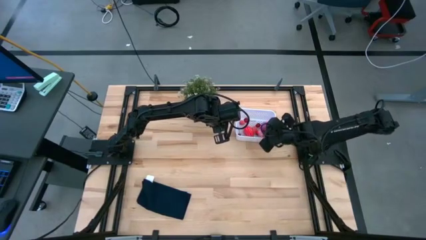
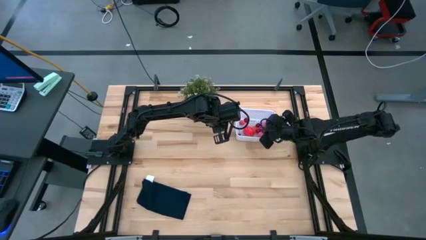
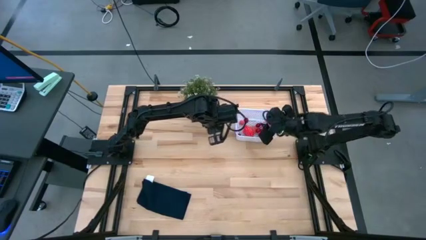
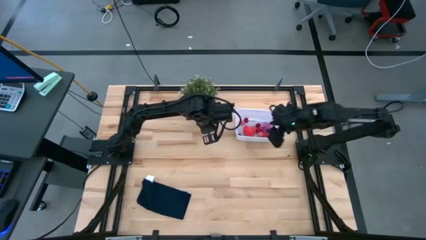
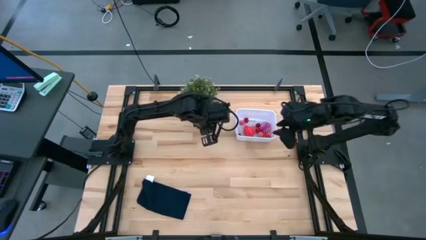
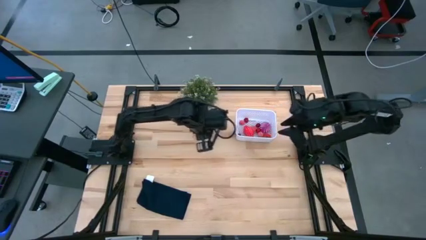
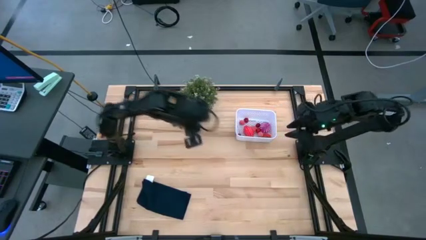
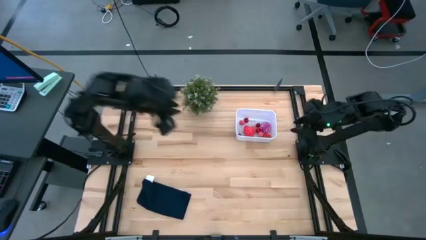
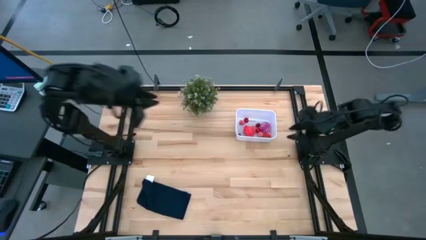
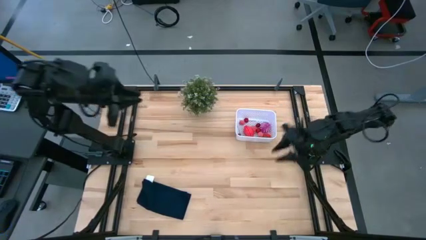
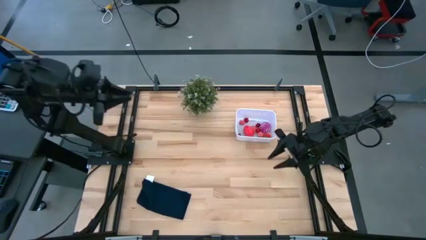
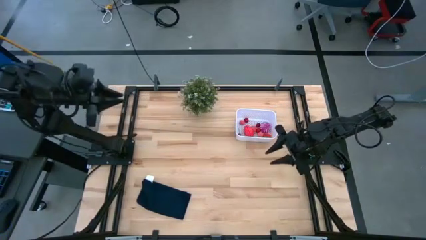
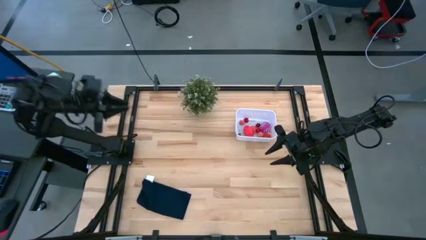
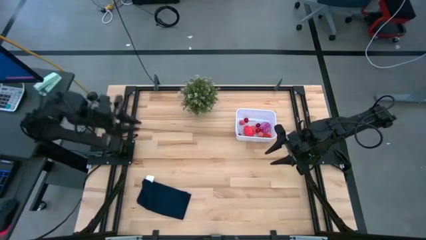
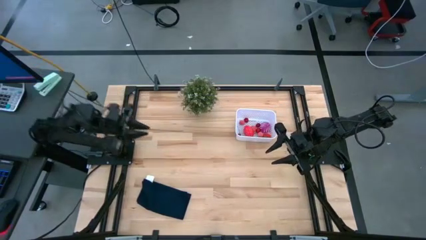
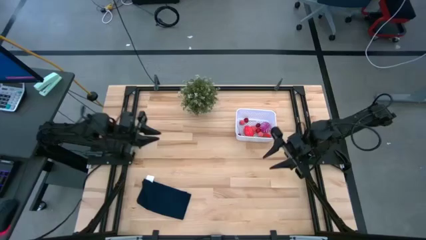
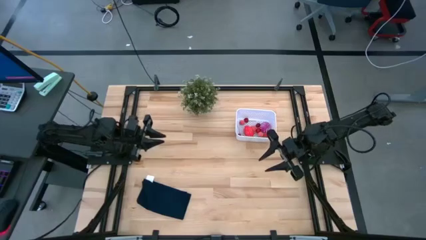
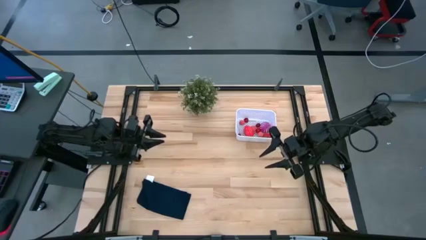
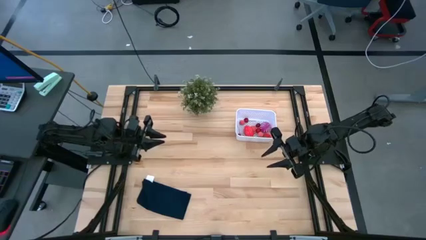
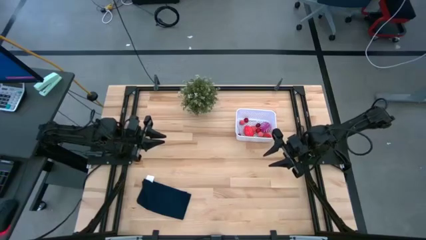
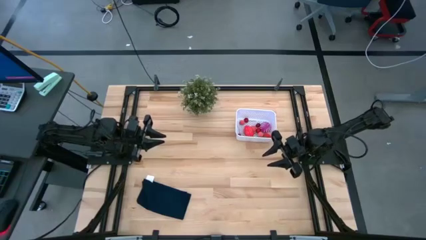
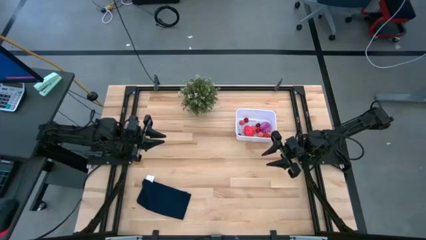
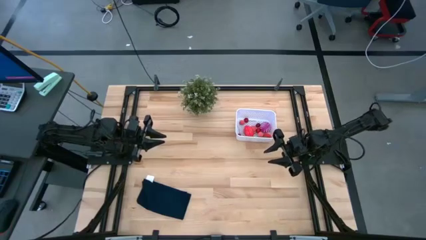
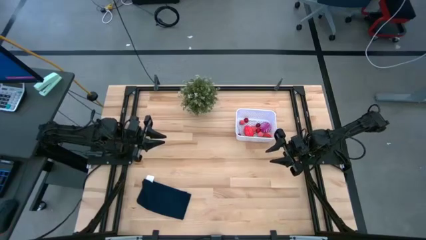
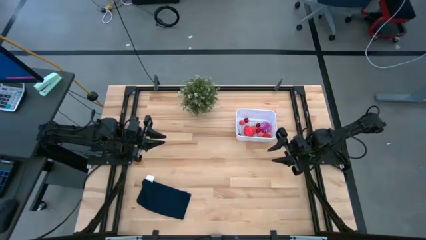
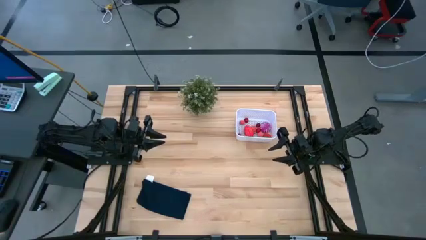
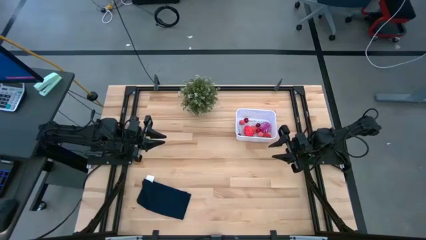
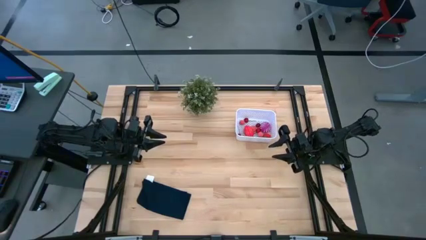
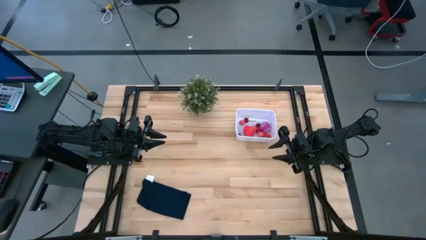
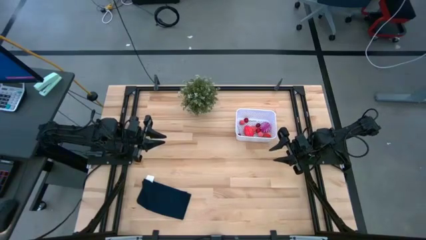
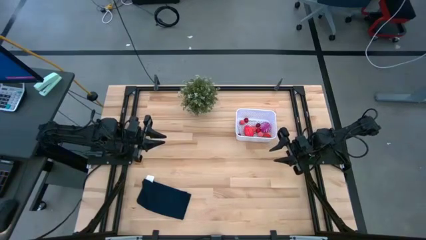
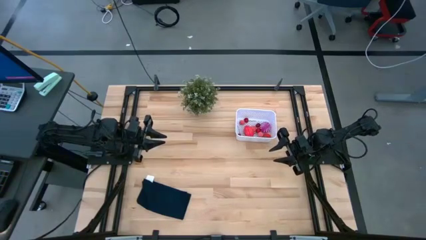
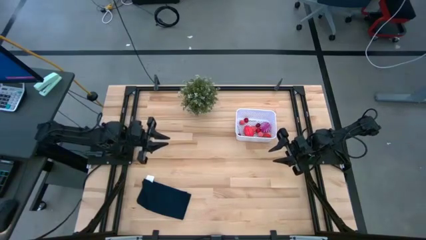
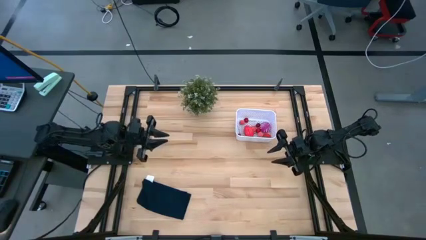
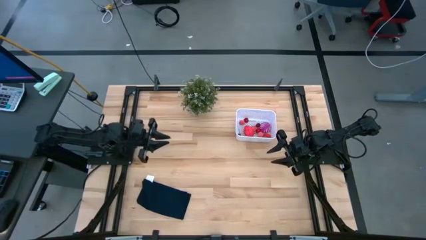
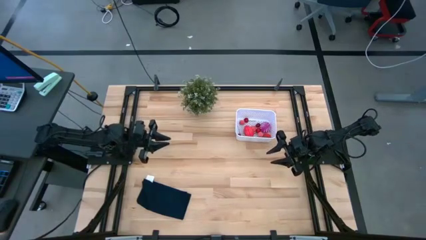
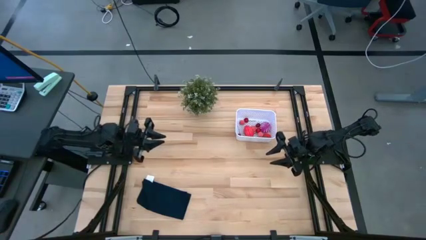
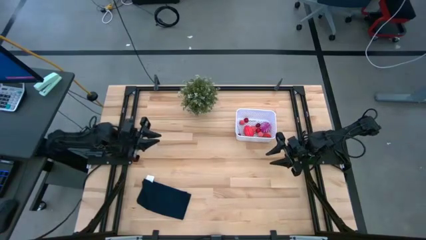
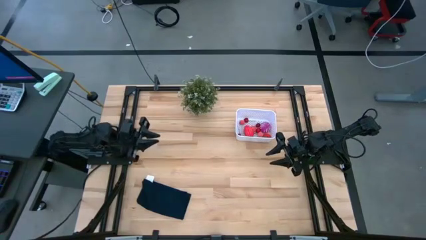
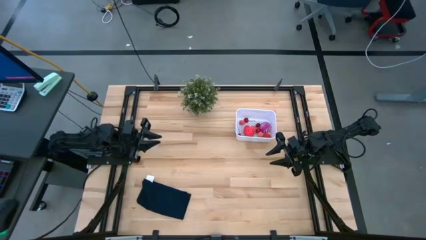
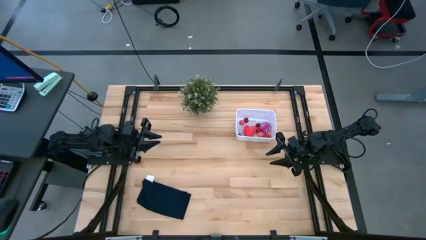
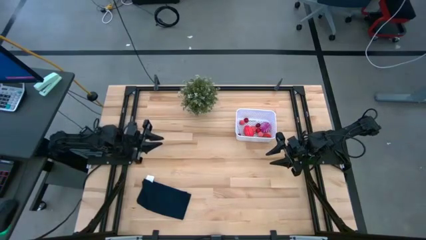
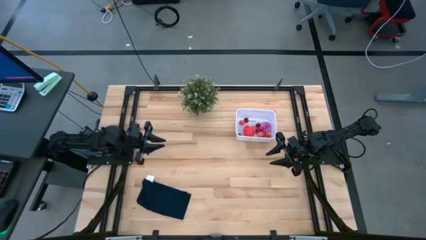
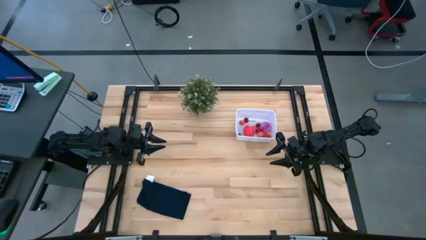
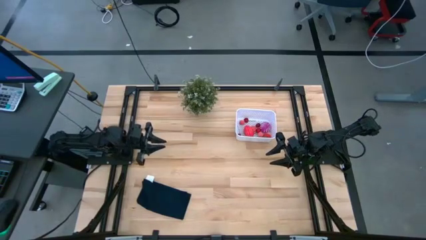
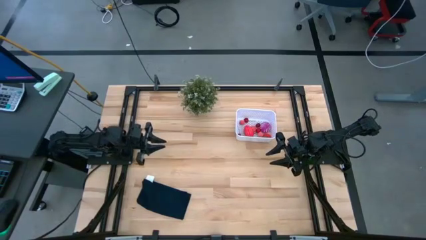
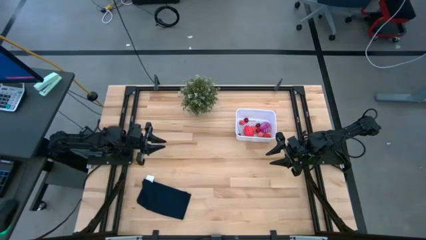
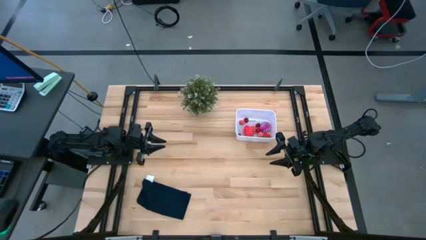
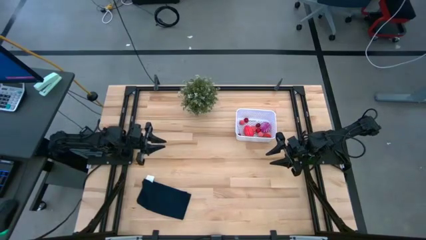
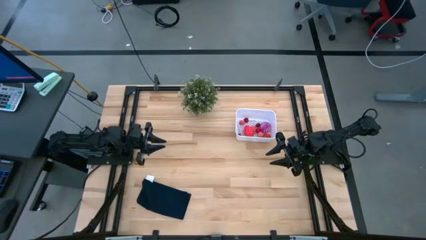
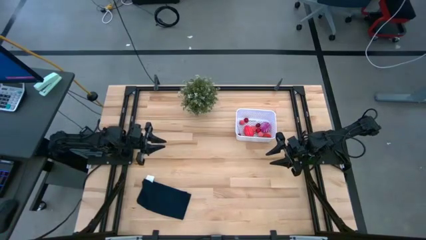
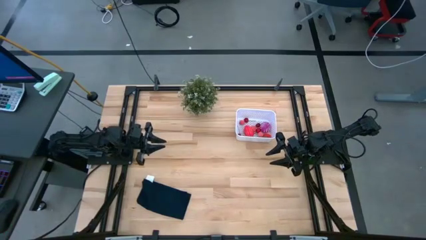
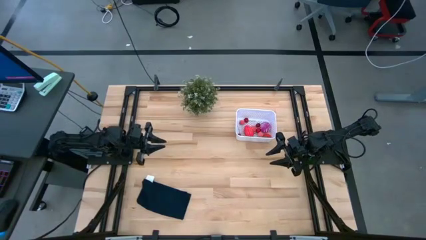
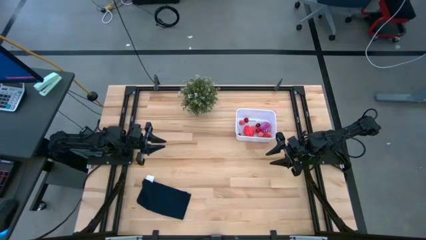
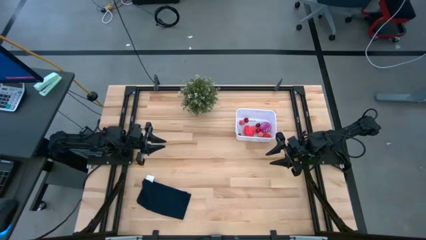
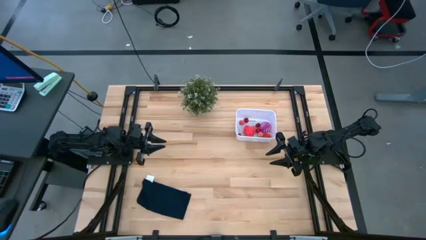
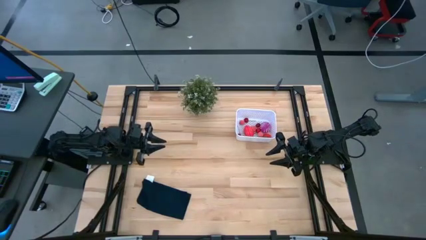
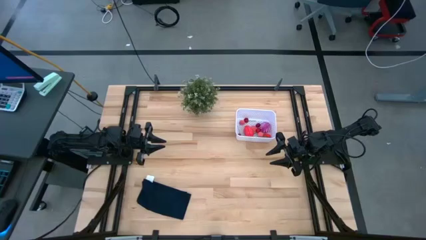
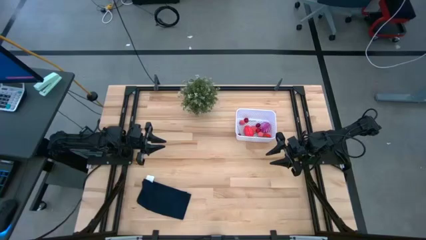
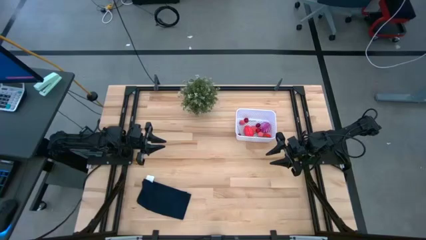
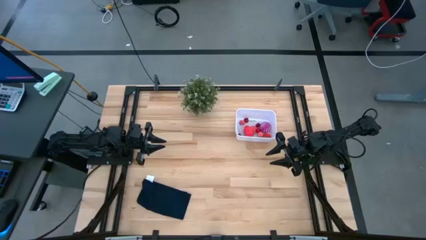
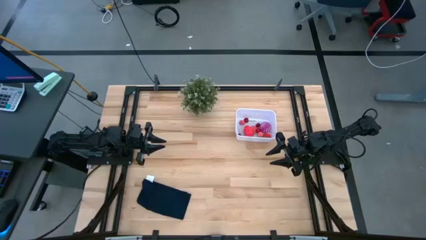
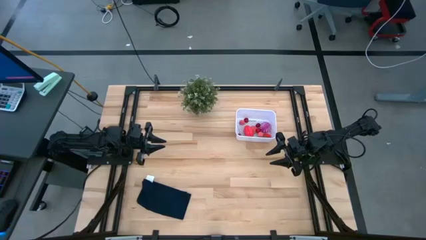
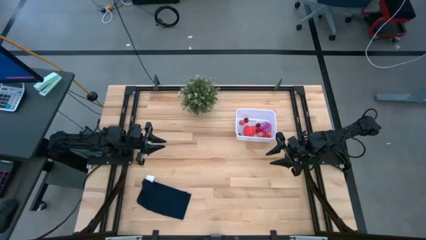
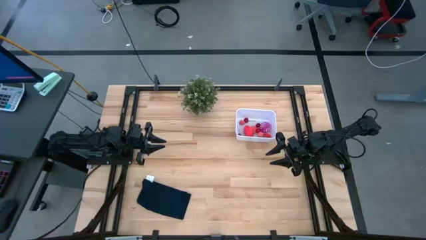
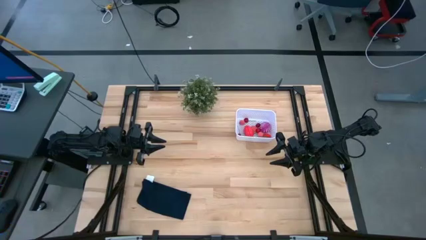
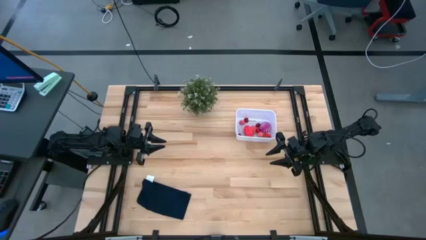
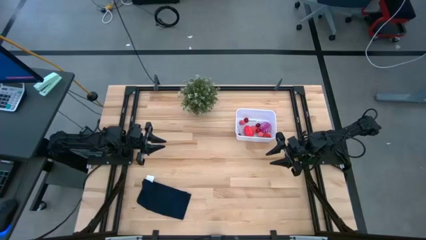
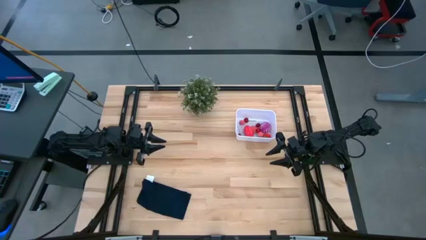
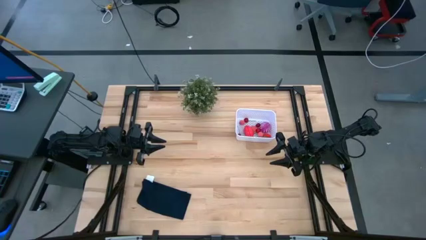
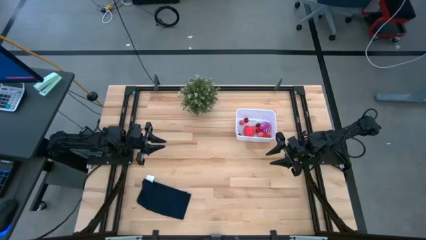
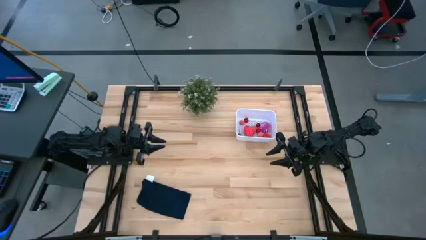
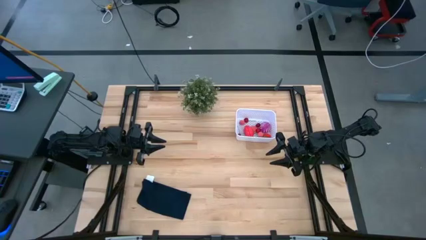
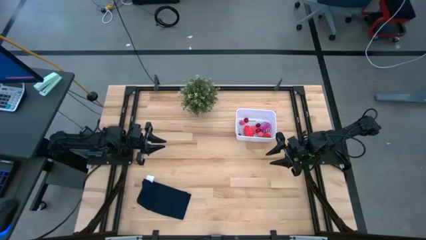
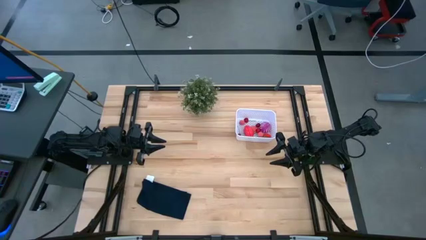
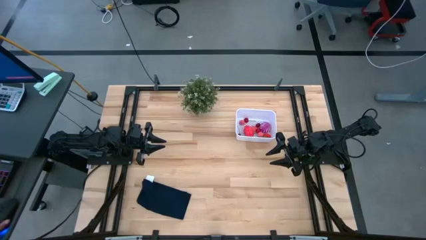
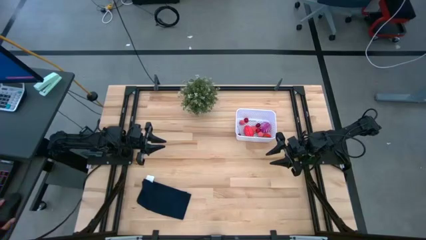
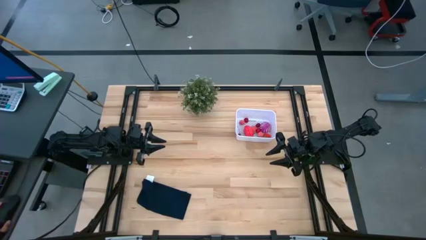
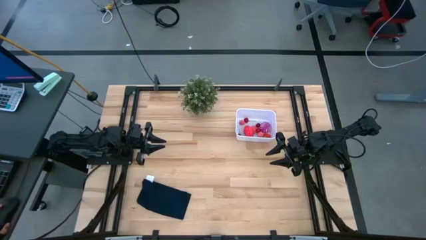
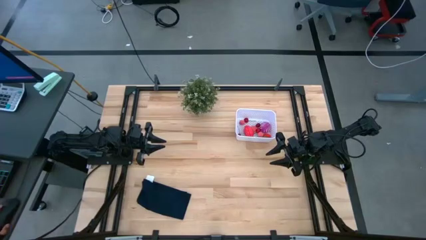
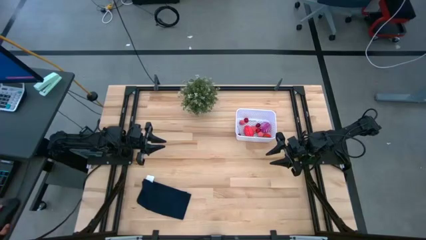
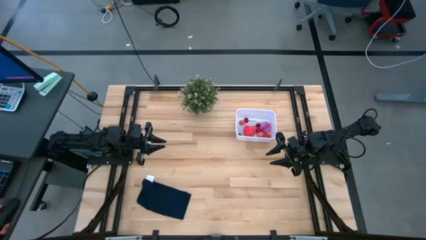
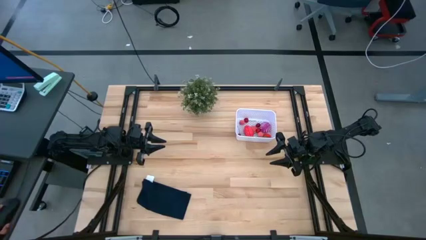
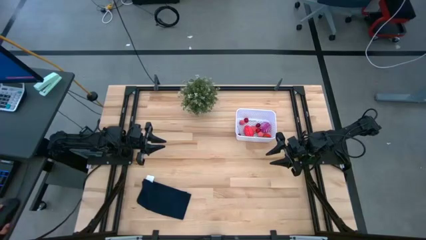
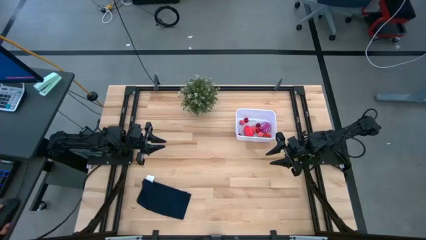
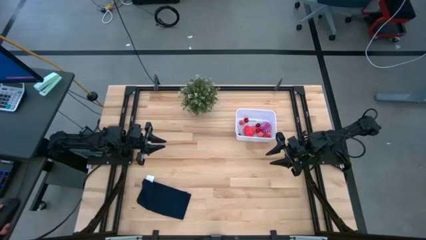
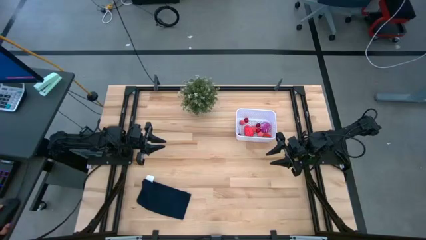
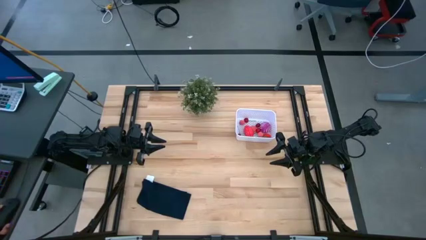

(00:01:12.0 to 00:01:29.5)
Task: Pick and placing Produce into tupperware
Return to Home Position
